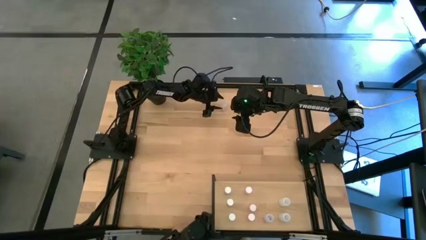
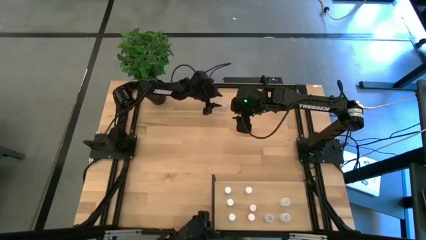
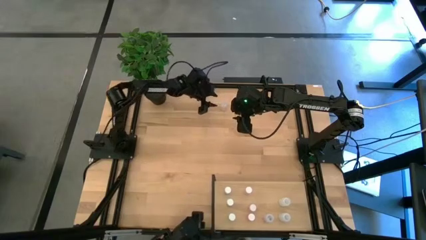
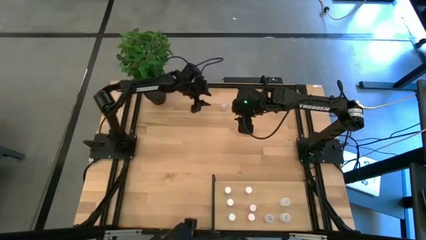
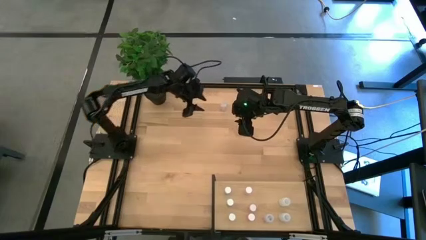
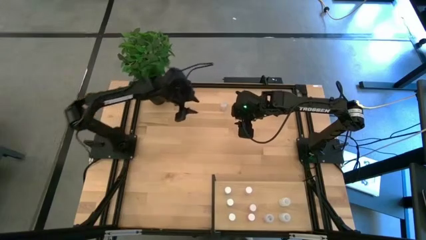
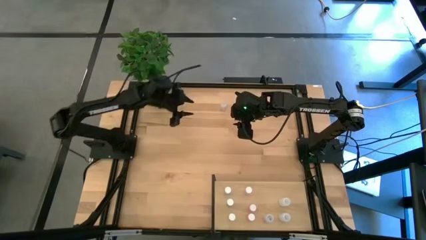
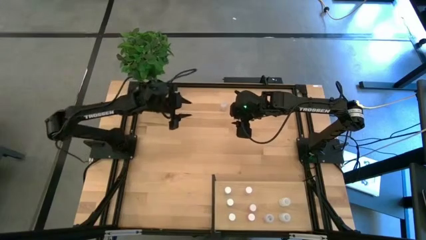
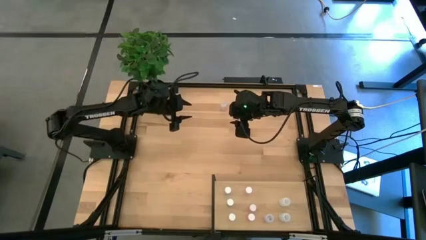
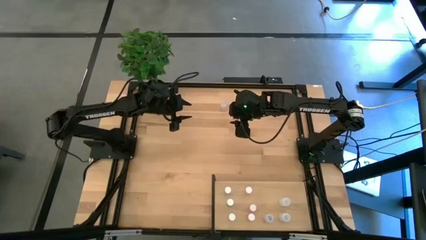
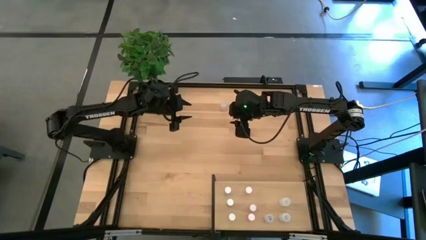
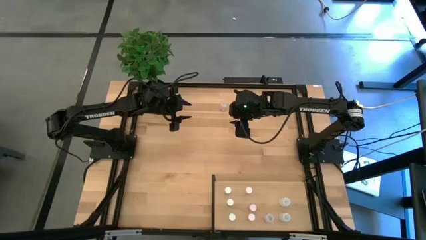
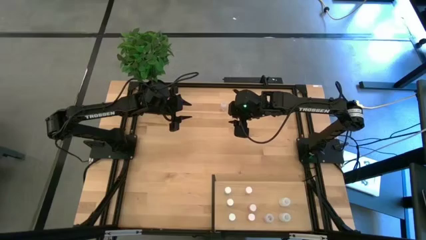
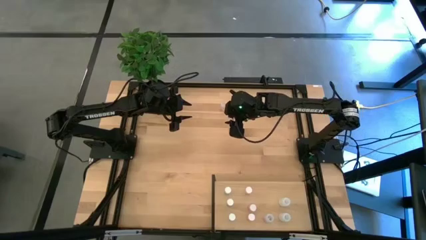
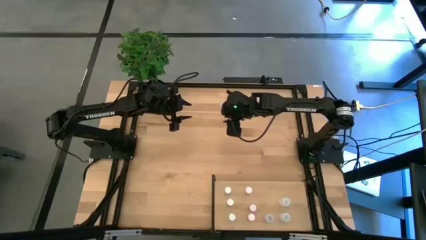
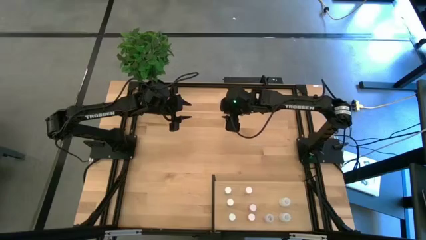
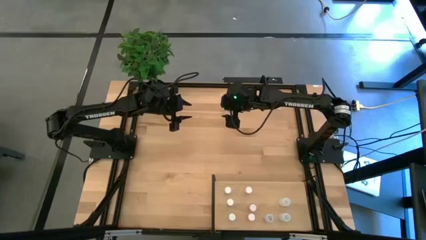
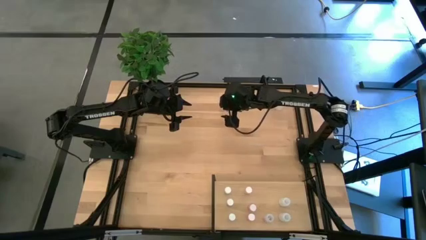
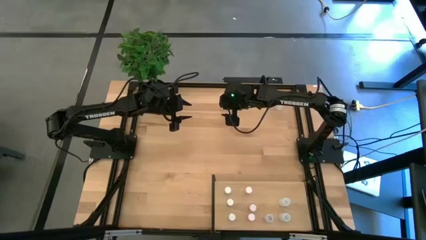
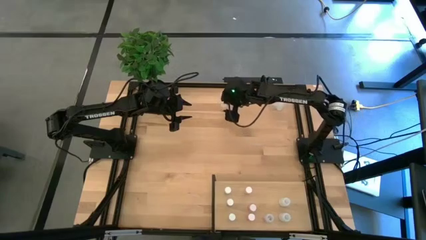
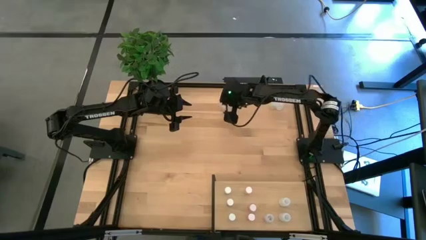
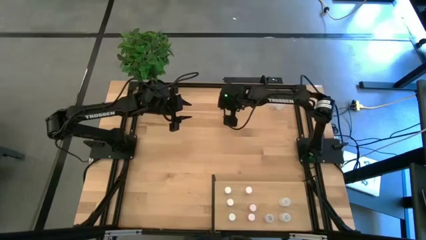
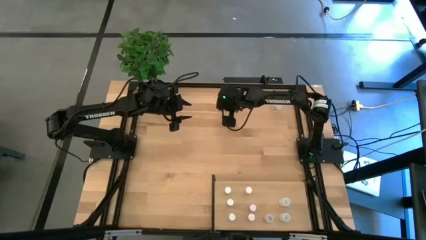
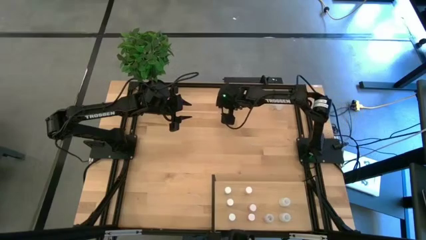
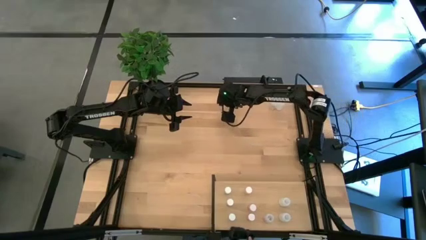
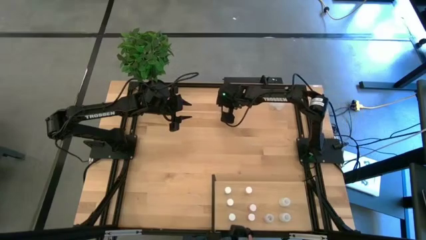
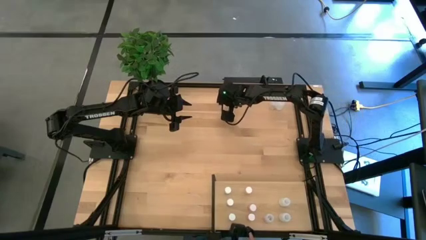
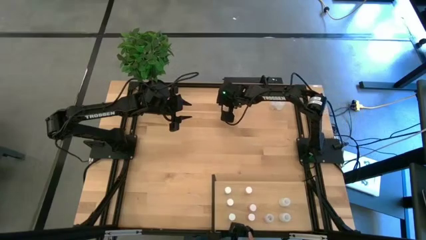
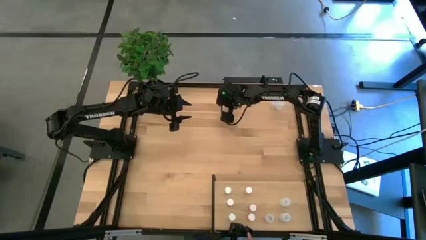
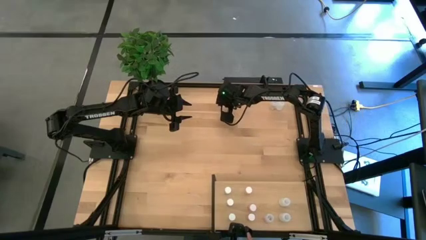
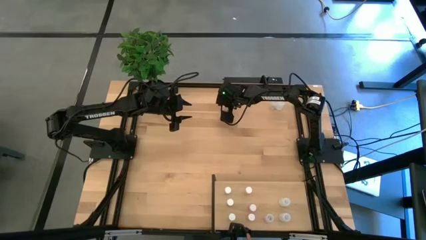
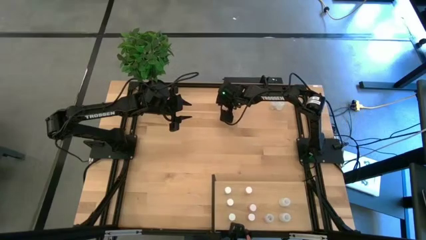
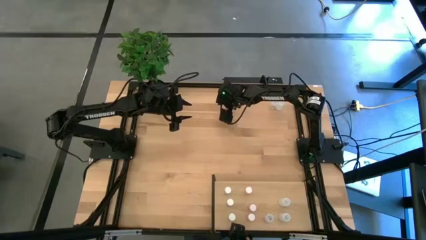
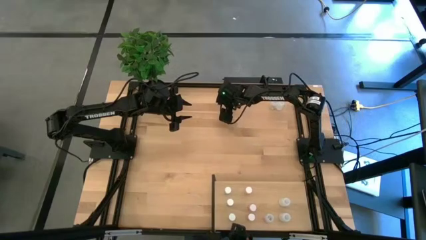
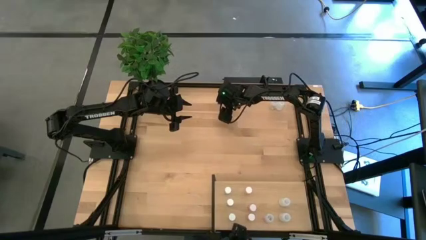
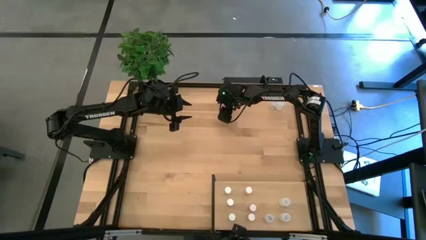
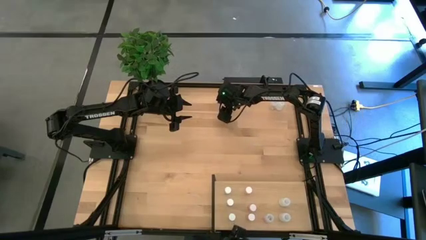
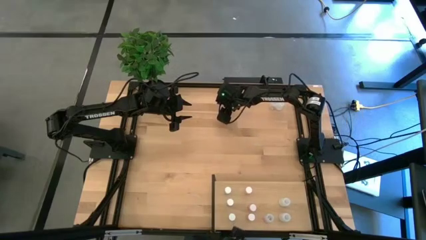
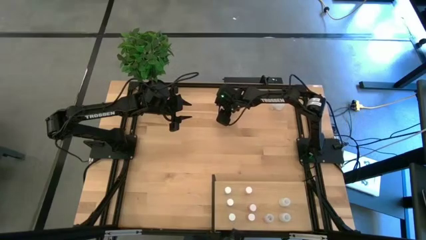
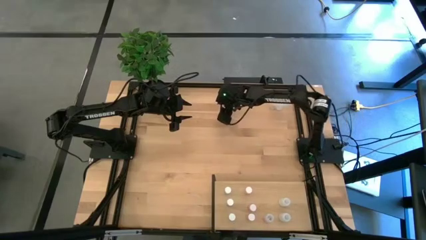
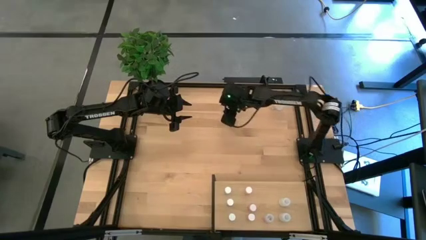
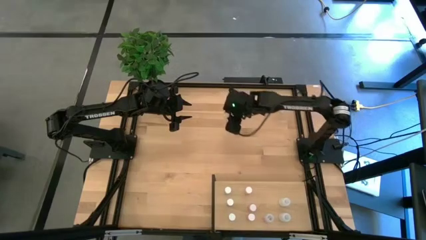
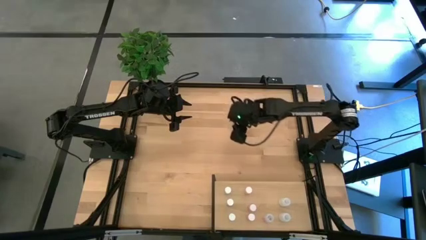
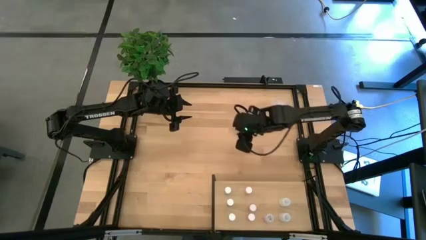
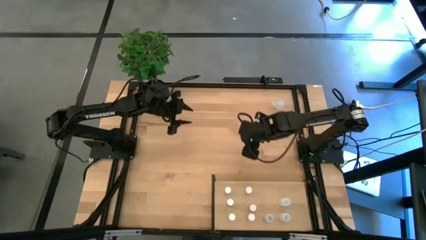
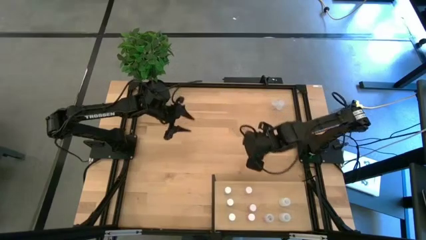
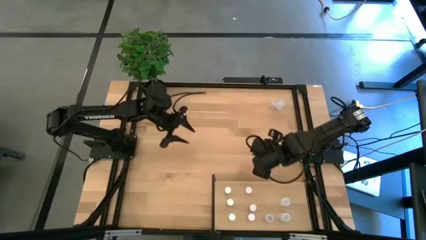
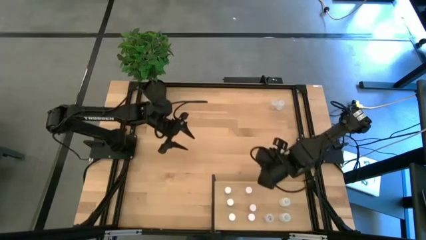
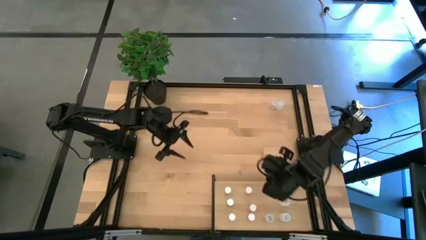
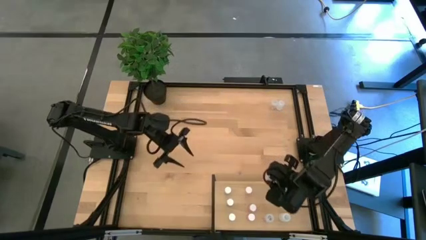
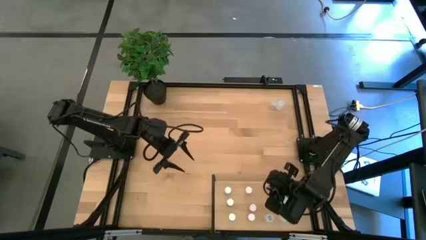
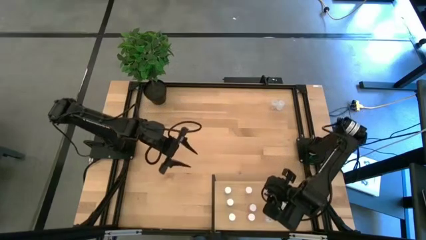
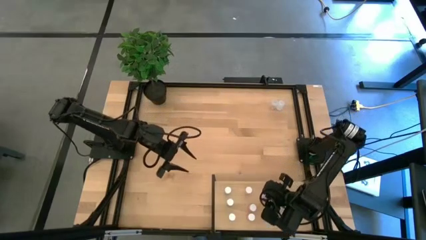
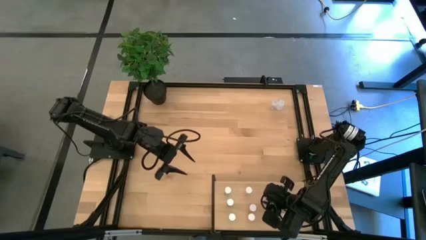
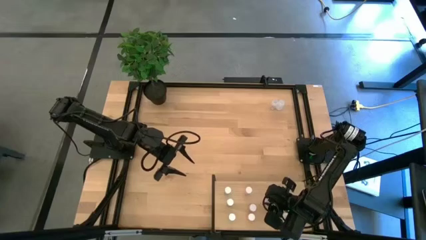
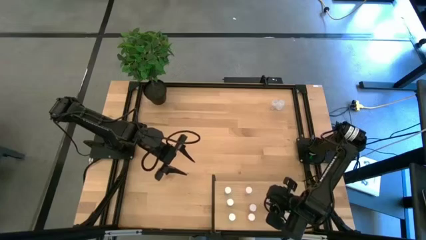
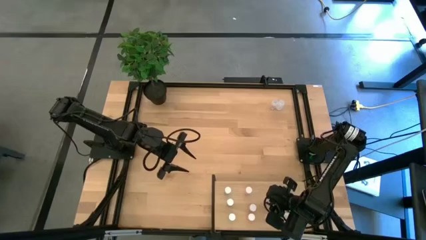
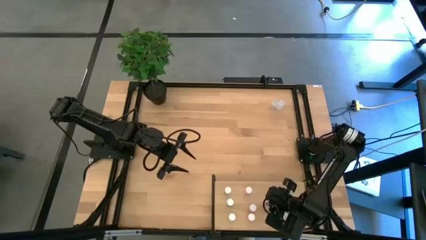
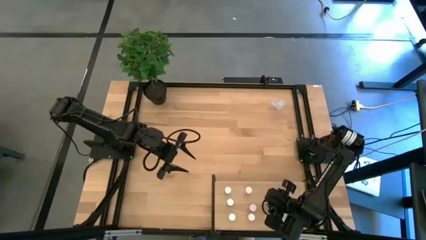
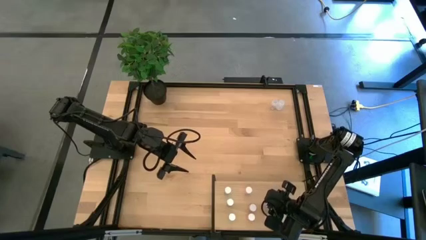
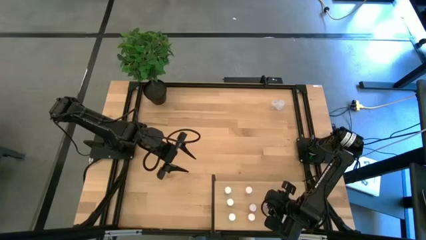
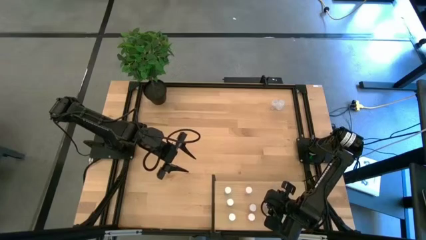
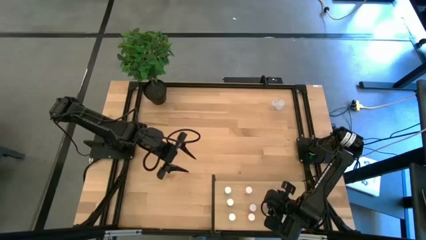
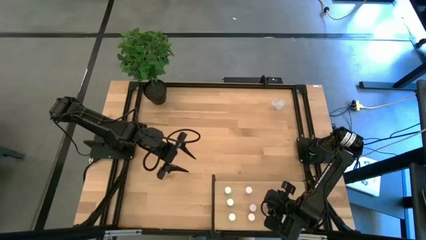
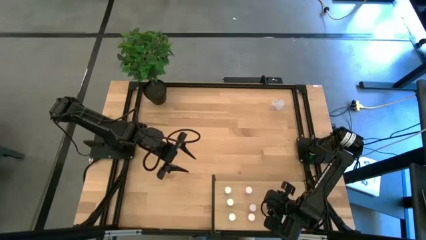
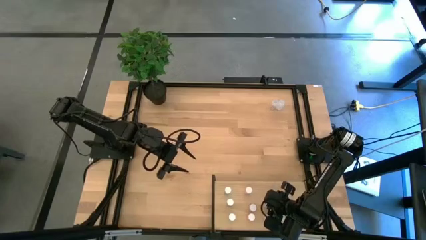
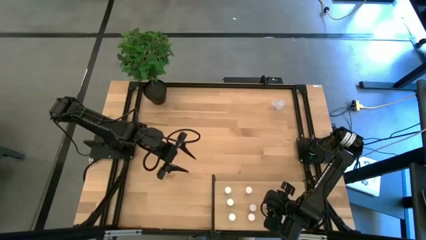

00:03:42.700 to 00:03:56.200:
Task: Pick and place medicine bottles onto shelf by color
Put the left transparent pill bottle on the shelf aligned with the other transparent pill bottle
